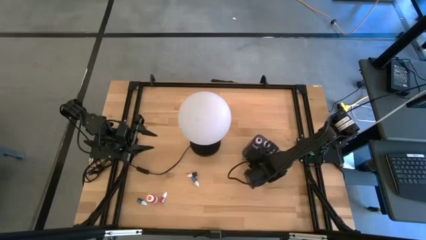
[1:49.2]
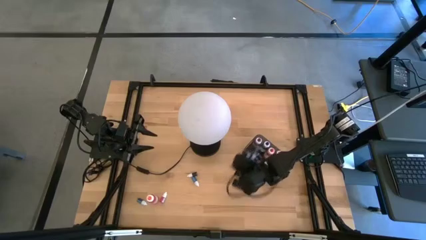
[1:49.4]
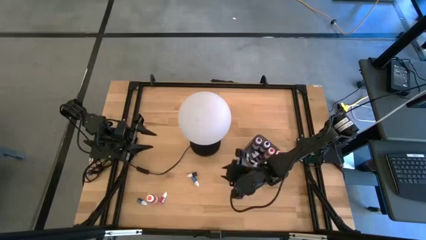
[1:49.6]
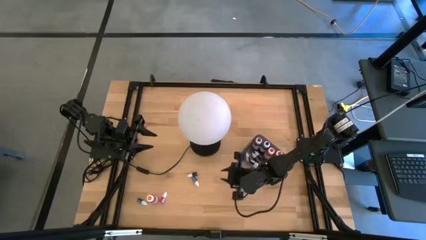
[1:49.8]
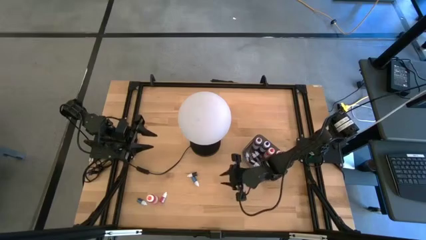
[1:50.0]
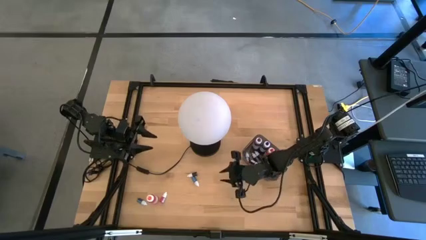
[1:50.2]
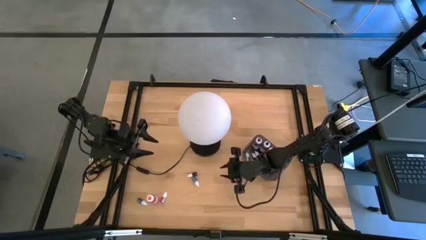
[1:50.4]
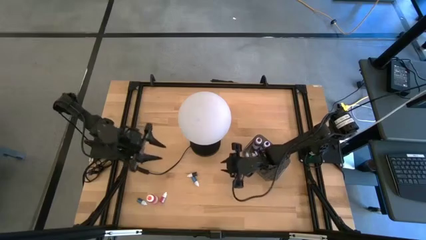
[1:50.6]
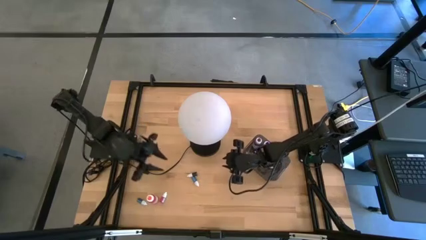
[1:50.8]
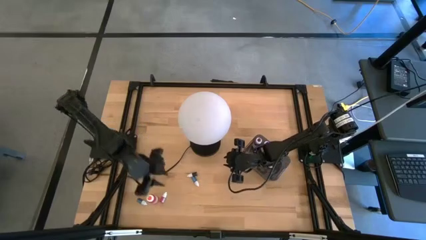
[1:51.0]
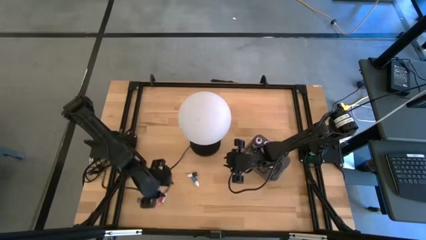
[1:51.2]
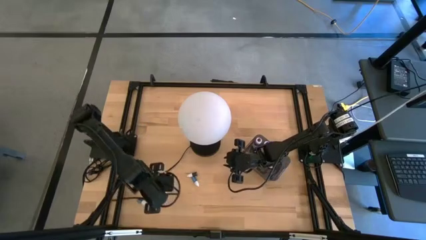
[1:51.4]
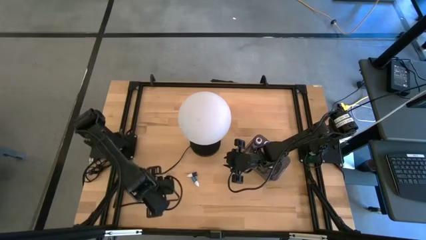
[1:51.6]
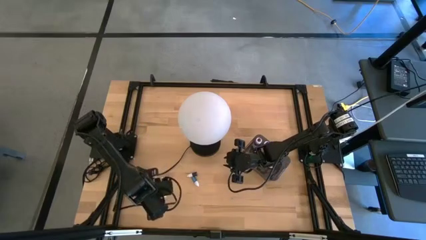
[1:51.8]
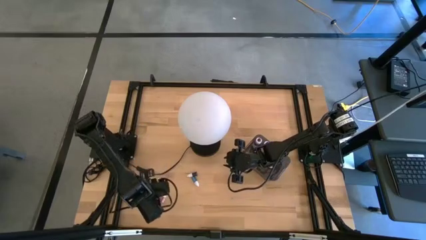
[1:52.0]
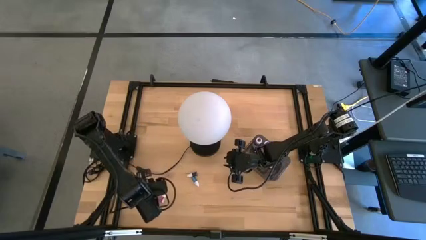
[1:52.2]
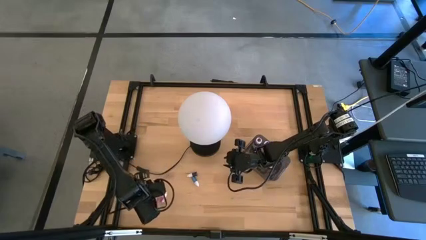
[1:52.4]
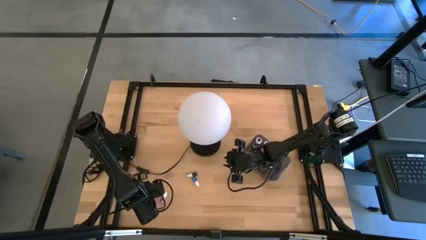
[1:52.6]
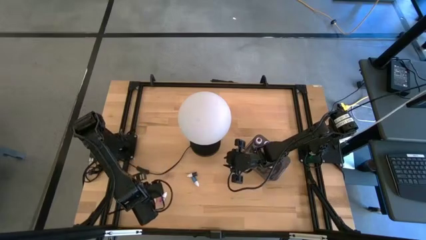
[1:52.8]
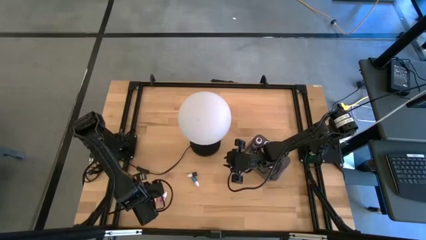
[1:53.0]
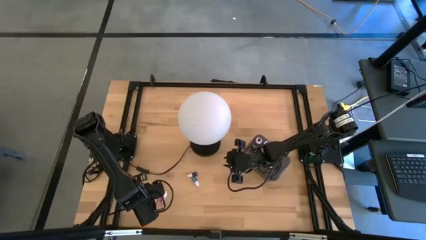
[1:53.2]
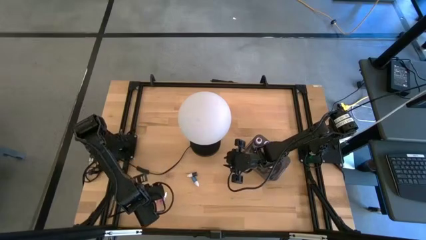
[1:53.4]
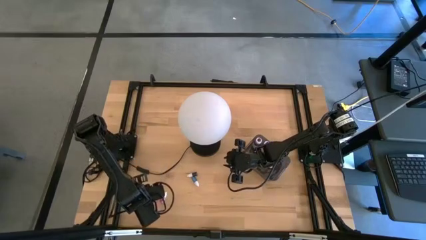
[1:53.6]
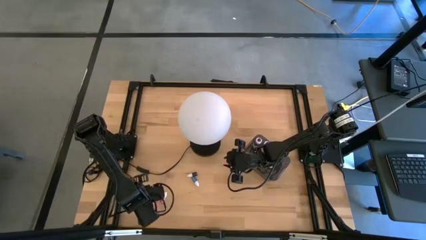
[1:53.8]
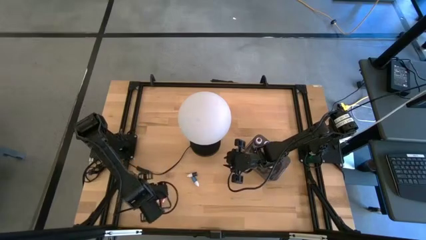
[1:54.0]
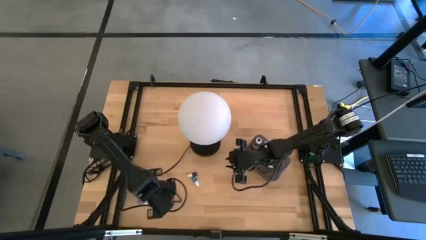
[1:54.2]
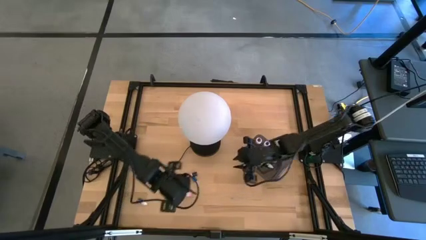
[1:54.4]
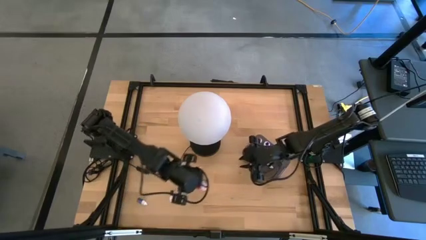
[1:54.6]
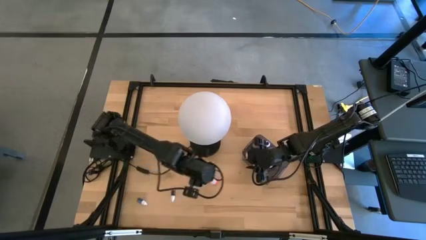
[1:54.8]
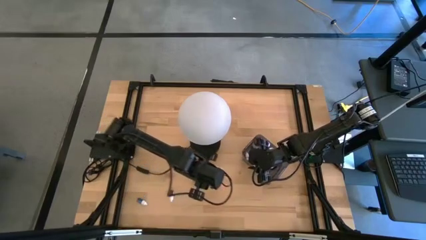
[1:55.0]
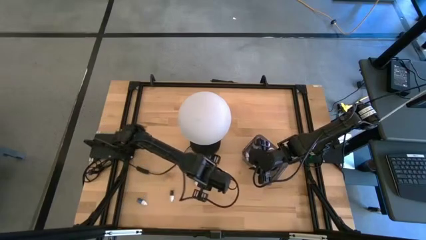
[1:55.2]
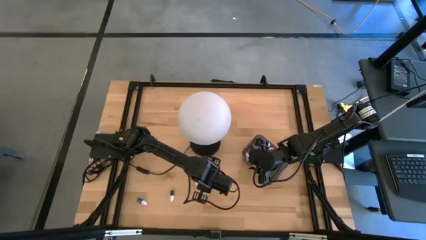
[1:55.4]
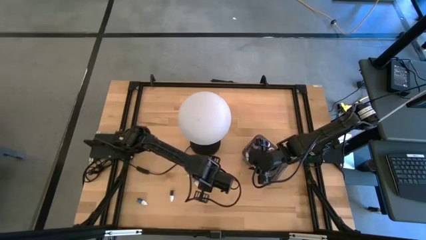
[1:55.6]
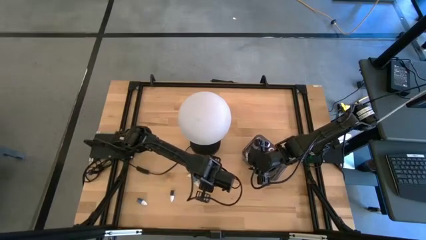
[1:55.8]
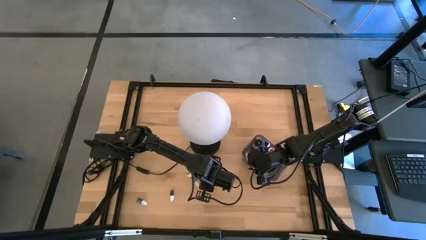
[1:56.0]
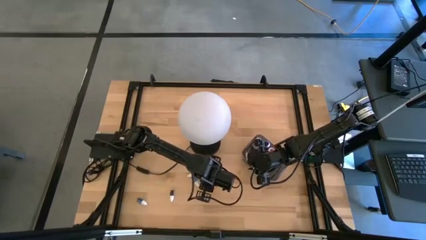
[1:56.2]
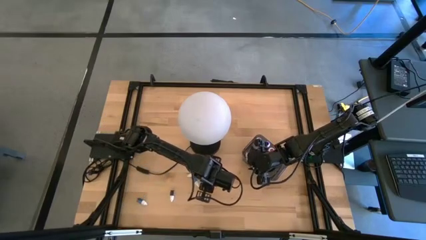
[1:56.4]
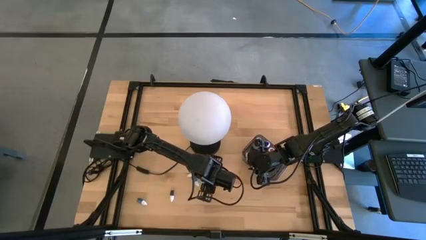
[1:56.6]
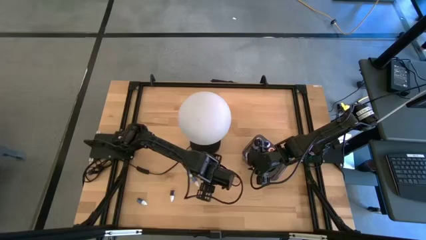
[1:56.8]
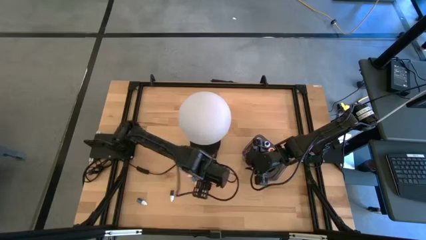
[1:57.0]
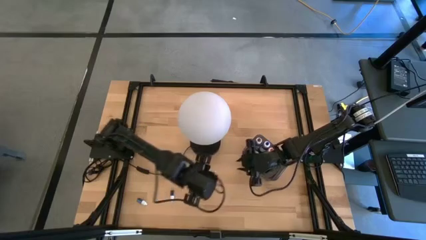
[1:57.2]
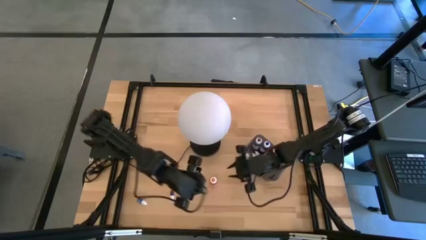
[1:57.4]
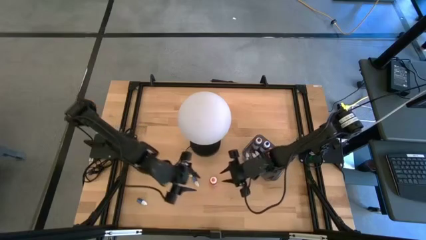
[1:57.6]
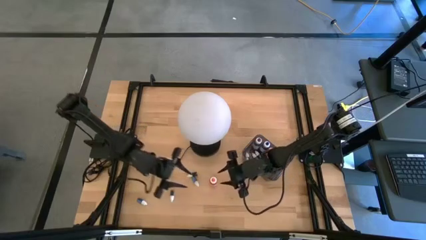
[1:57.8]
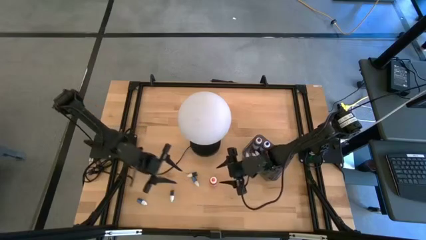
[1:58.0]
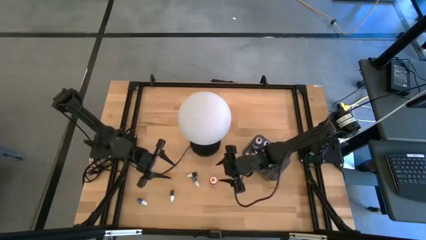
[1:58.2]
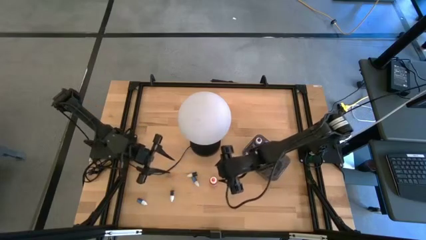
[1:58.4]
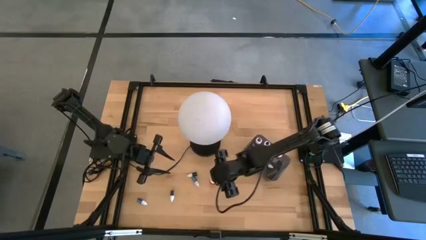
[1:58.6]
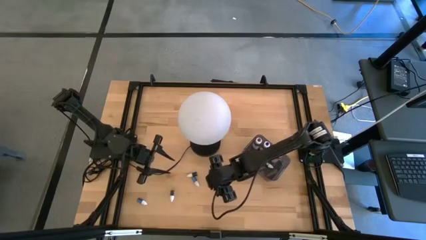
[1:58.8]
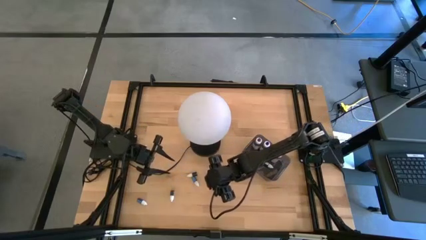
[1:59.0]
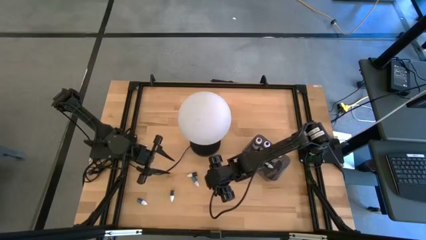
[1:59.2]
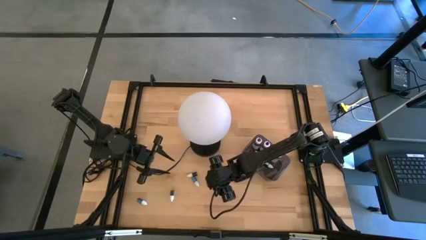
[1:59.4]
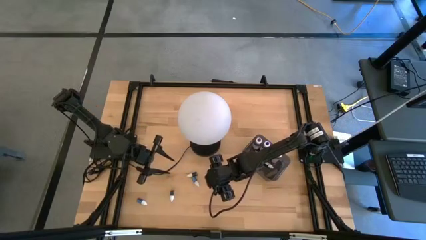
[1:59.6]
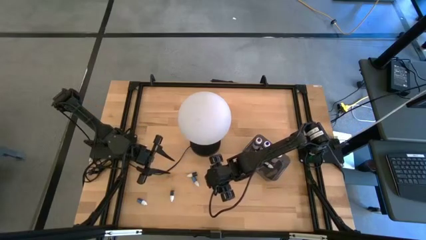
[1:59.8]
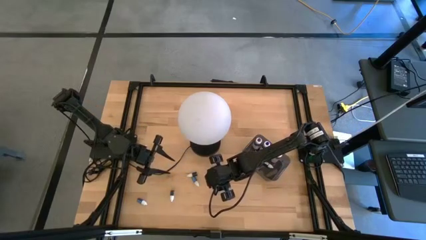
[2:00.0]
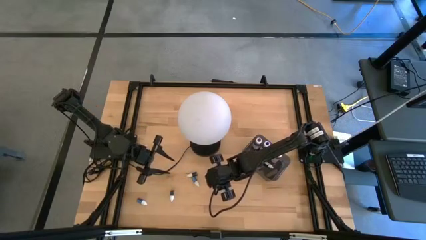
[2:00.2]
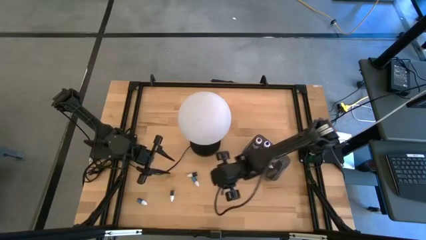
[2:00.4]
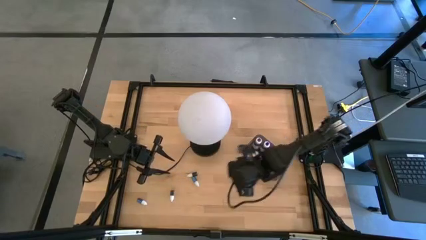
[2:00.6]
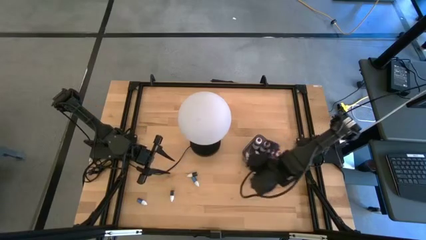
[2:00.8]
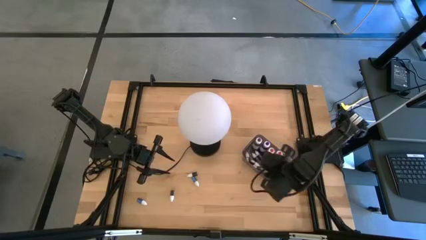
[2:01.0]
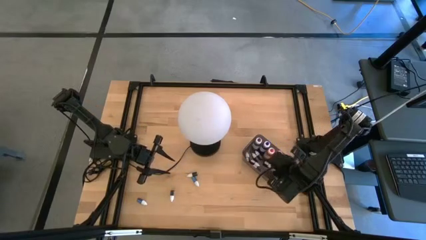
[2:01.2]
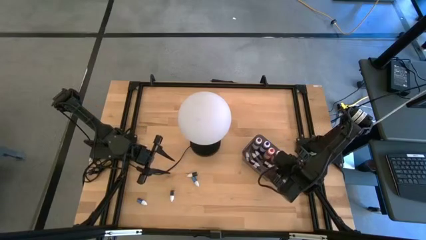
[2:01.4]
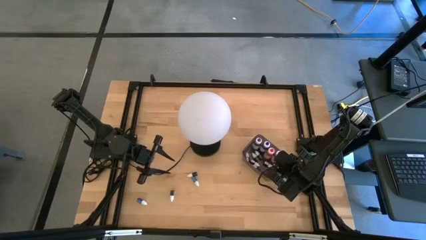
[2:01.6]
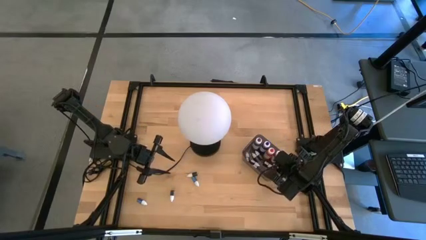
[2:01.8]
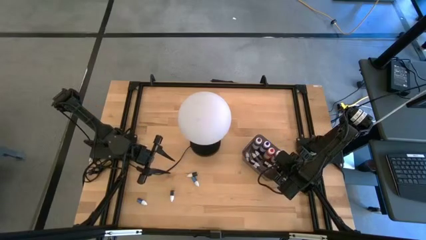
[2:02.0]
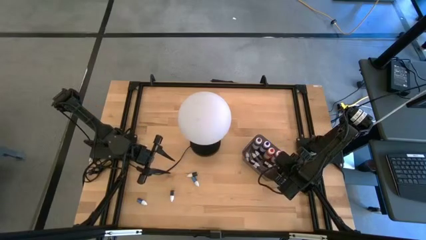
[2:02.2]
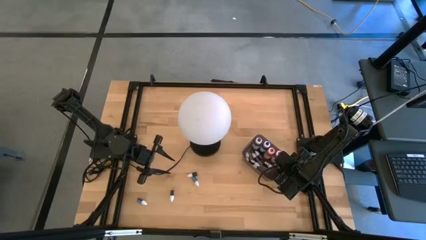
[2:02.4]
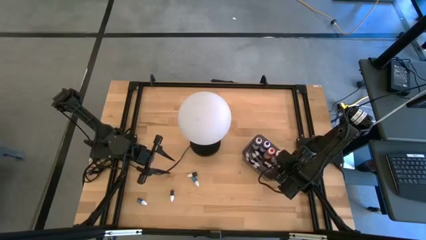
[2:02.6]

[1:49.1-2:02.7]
Task: Pick & Place food coloring
Put the large orange food coloring bottle into the black container

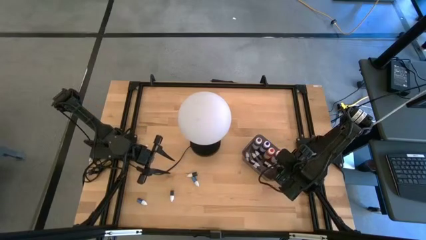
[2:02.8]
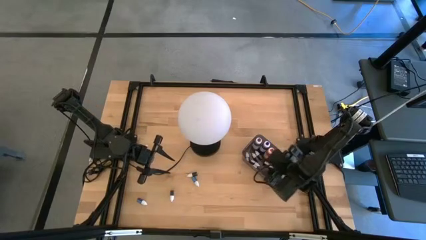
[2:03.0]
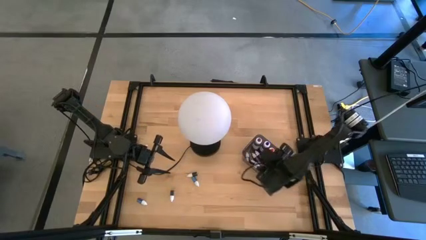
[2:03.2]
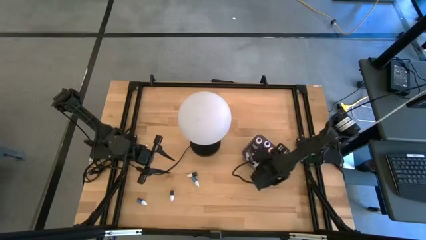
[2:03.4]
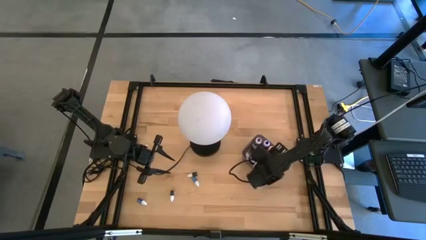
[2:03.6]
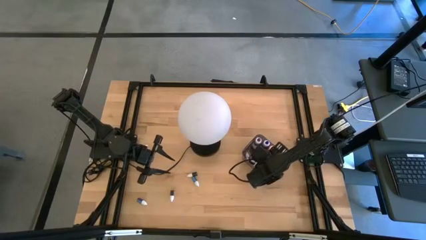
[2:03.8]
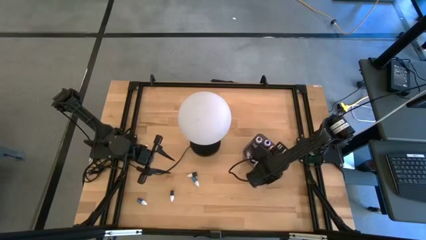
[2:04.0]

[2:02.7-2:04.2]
Adjust the large orange food coloring bottle in the black container
